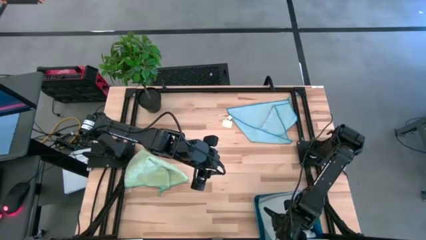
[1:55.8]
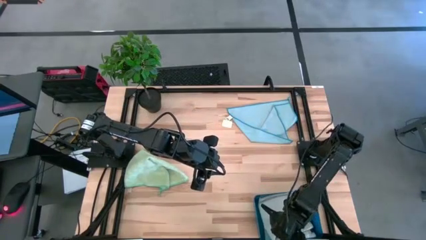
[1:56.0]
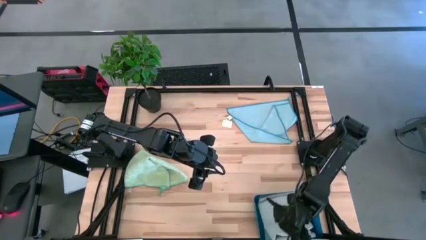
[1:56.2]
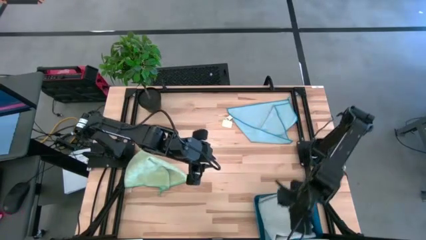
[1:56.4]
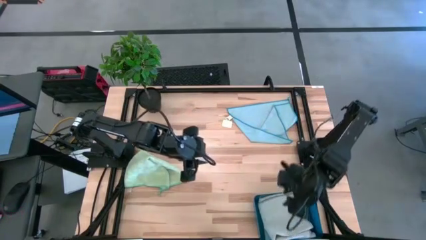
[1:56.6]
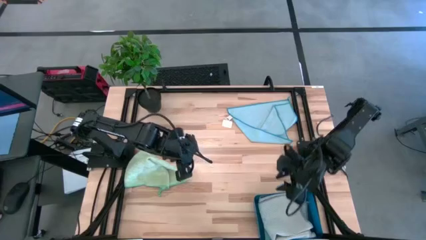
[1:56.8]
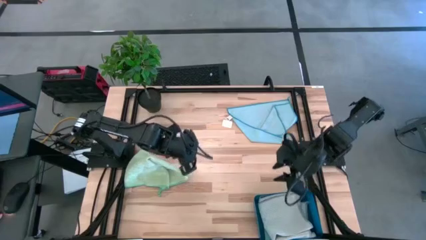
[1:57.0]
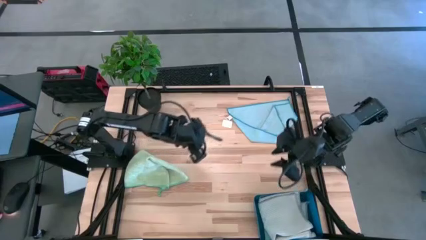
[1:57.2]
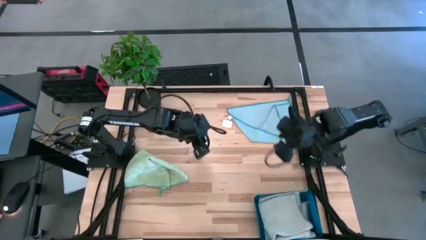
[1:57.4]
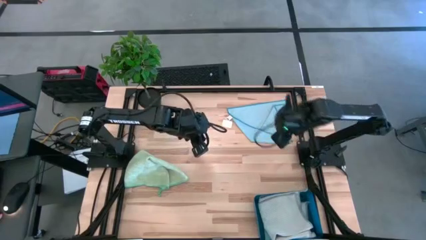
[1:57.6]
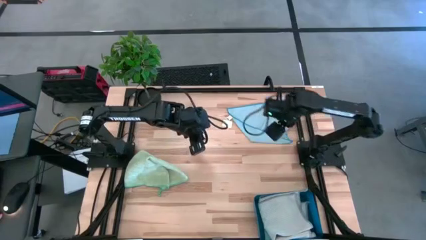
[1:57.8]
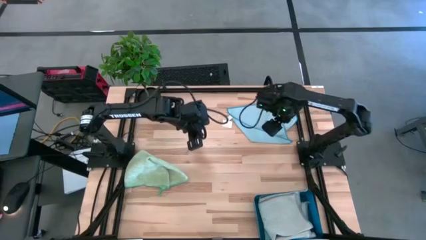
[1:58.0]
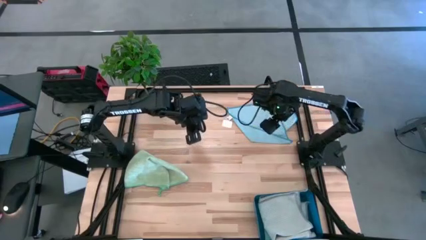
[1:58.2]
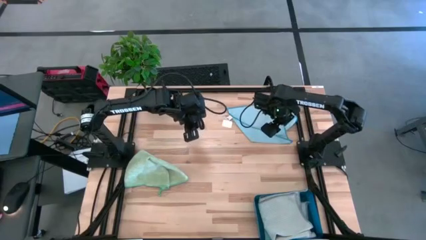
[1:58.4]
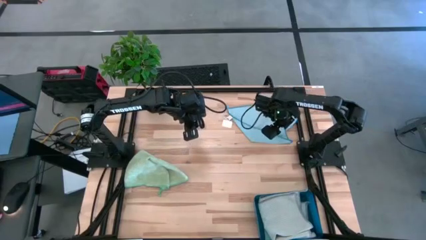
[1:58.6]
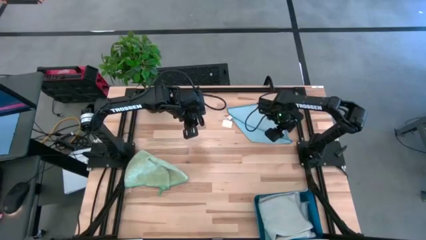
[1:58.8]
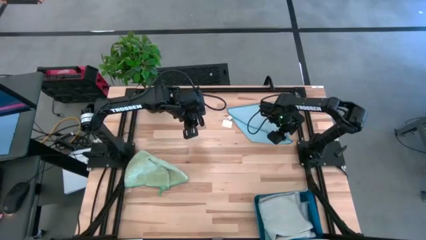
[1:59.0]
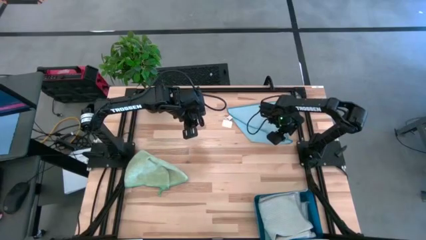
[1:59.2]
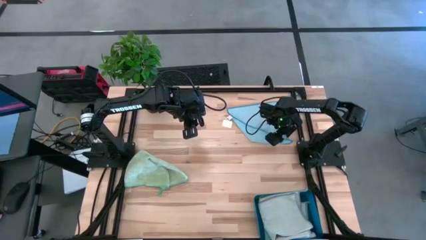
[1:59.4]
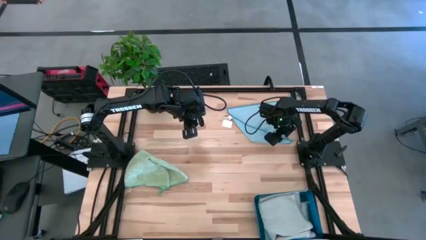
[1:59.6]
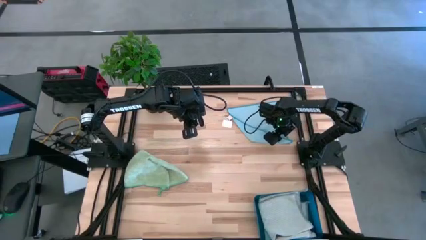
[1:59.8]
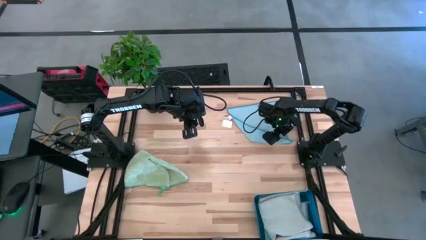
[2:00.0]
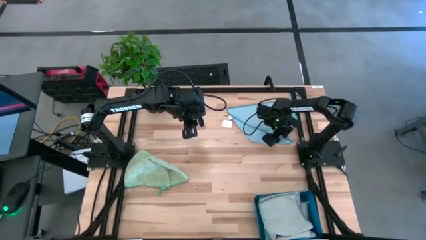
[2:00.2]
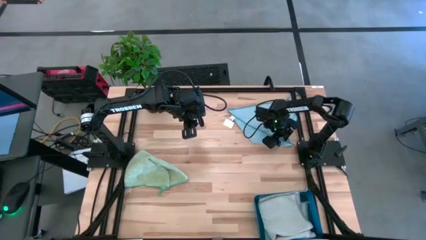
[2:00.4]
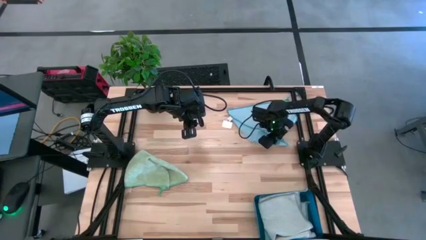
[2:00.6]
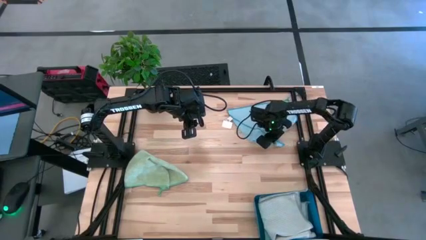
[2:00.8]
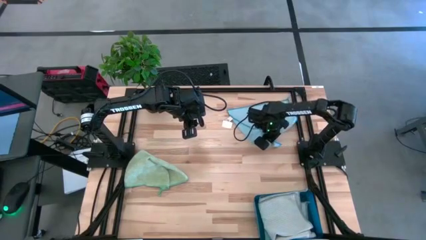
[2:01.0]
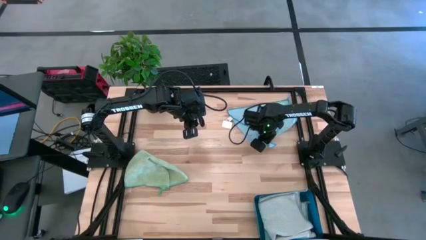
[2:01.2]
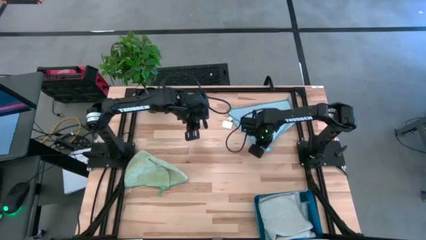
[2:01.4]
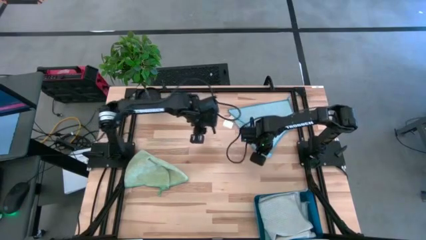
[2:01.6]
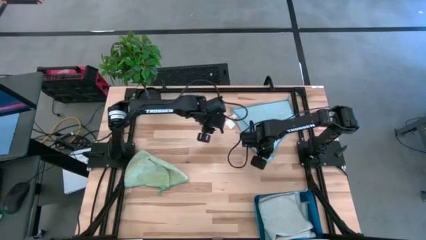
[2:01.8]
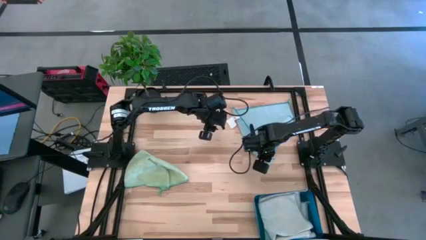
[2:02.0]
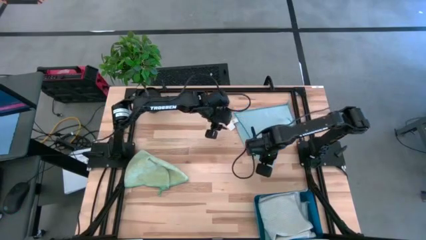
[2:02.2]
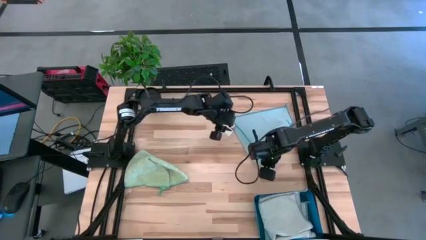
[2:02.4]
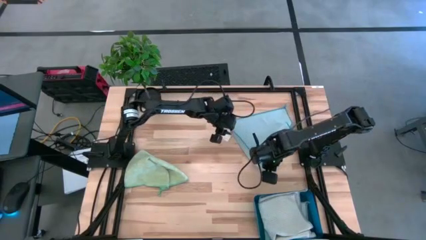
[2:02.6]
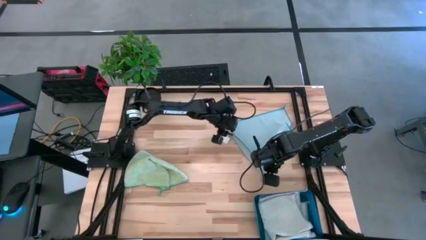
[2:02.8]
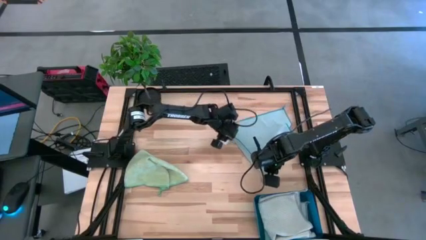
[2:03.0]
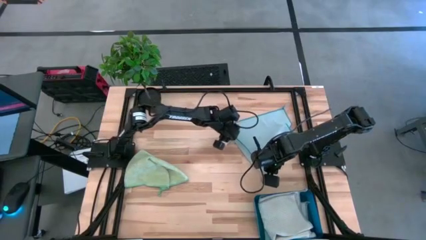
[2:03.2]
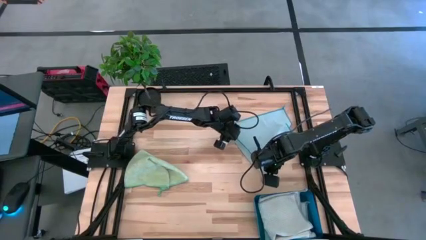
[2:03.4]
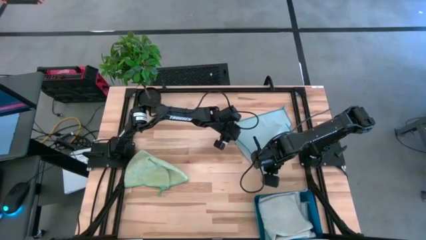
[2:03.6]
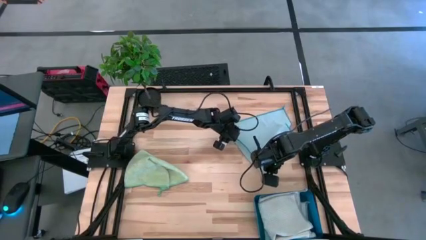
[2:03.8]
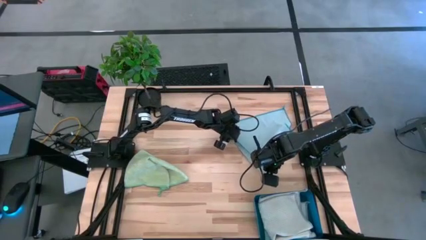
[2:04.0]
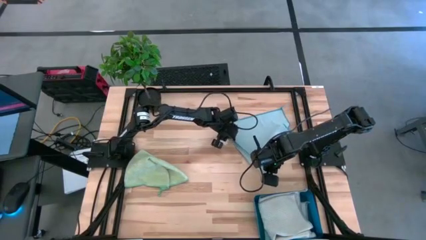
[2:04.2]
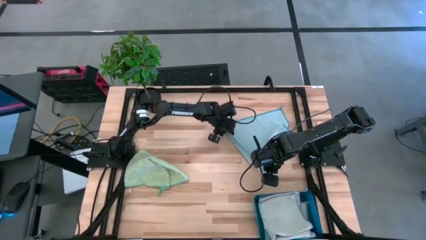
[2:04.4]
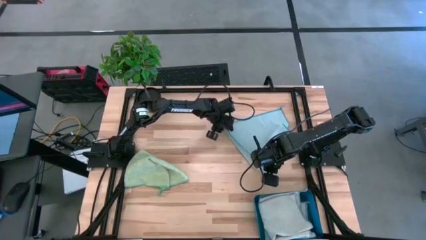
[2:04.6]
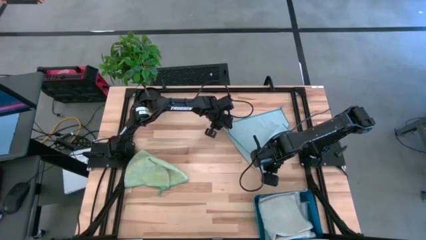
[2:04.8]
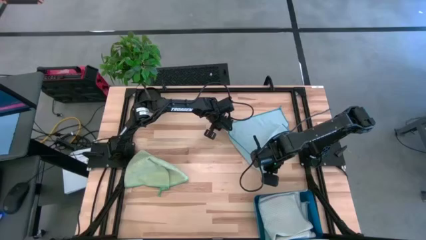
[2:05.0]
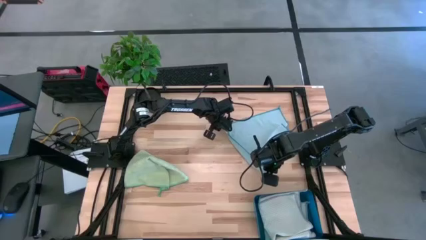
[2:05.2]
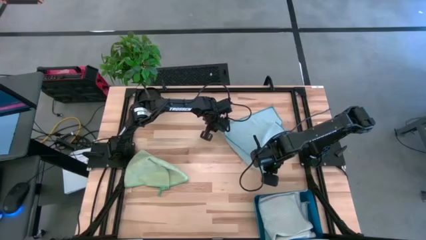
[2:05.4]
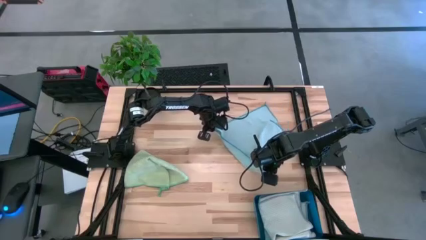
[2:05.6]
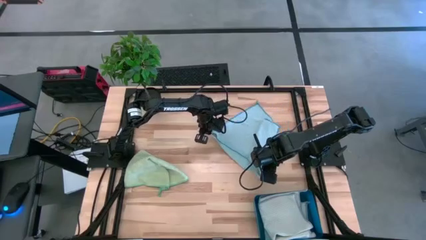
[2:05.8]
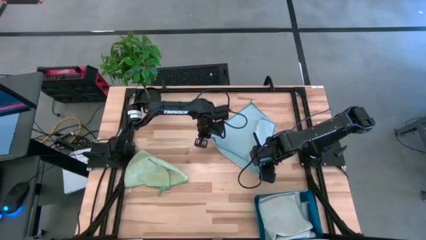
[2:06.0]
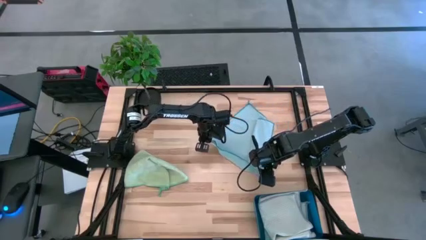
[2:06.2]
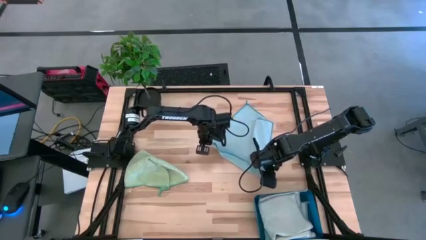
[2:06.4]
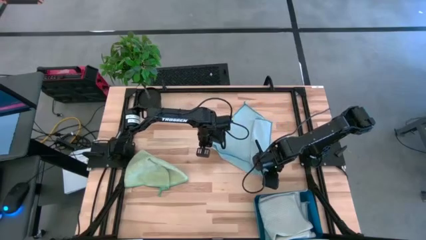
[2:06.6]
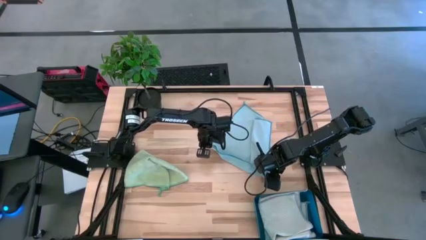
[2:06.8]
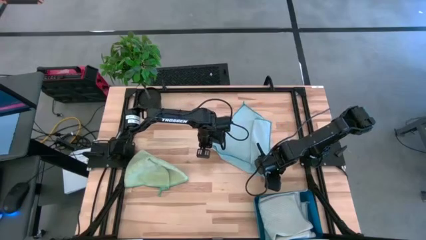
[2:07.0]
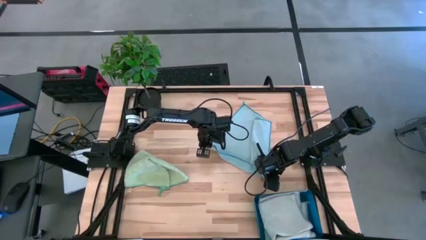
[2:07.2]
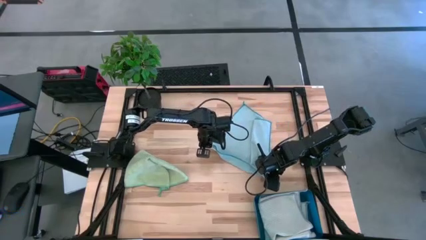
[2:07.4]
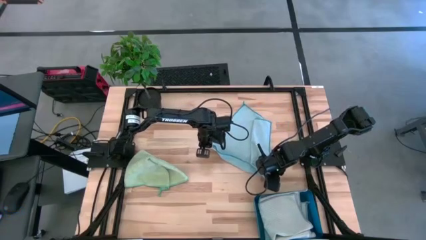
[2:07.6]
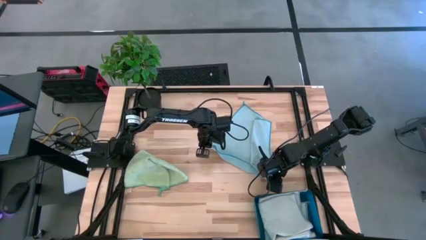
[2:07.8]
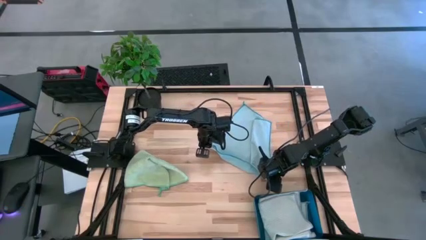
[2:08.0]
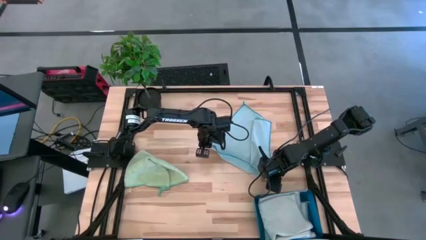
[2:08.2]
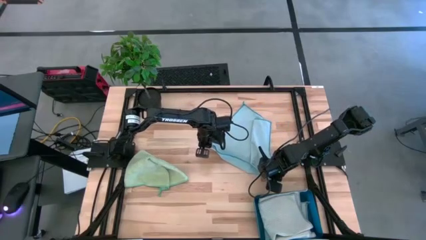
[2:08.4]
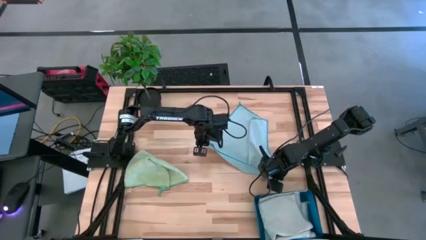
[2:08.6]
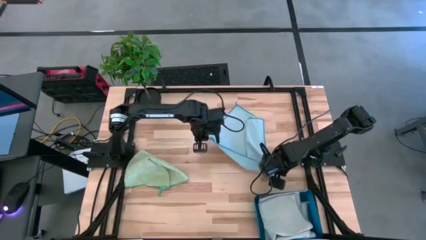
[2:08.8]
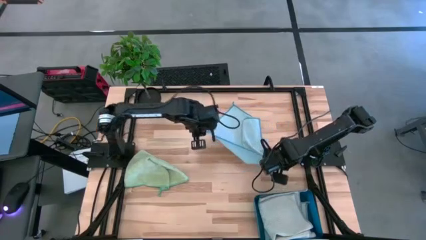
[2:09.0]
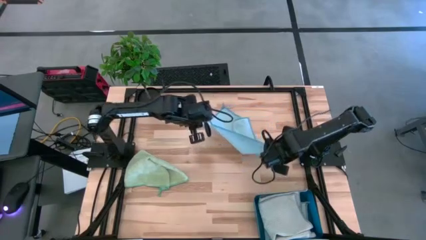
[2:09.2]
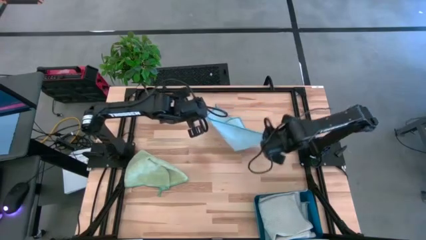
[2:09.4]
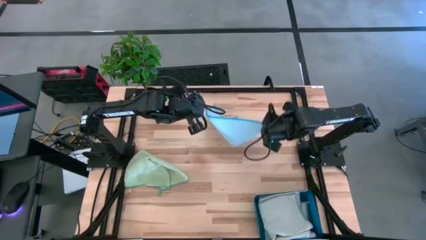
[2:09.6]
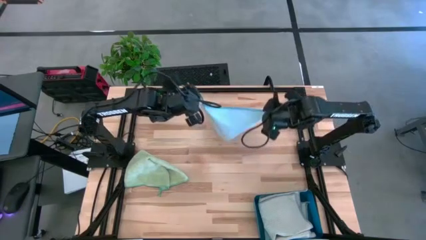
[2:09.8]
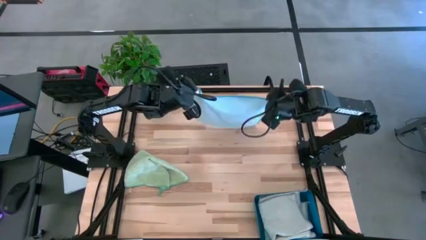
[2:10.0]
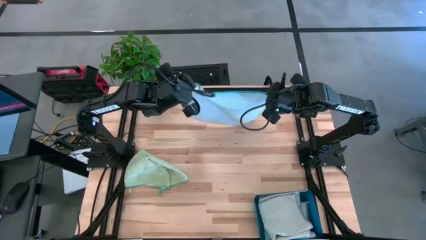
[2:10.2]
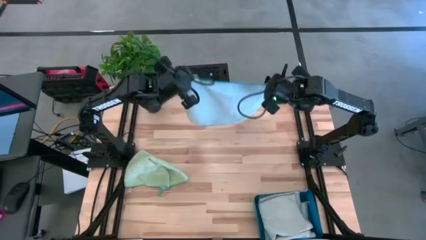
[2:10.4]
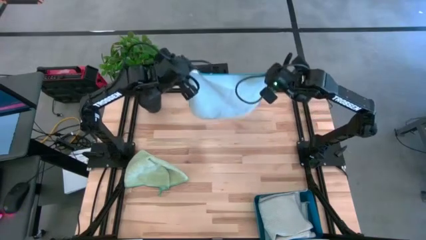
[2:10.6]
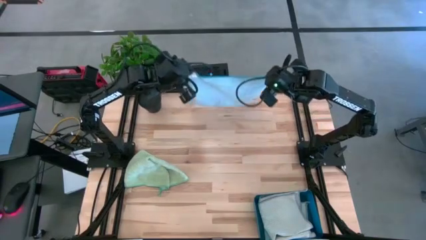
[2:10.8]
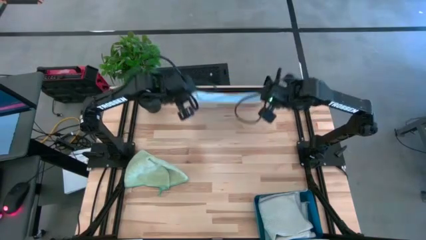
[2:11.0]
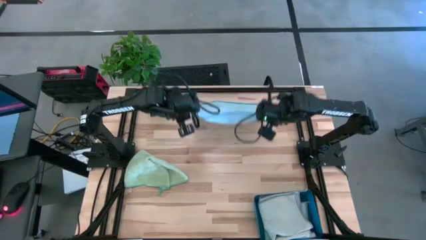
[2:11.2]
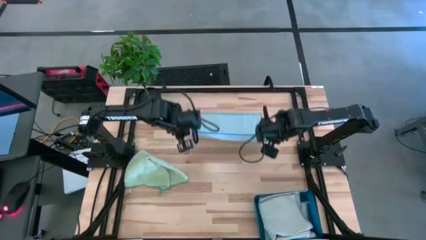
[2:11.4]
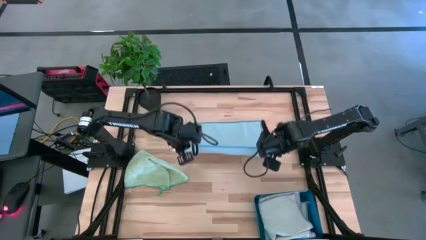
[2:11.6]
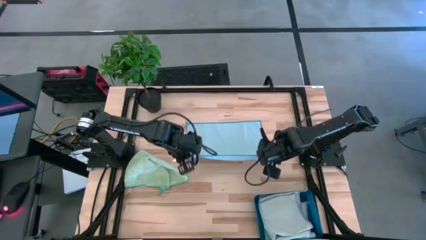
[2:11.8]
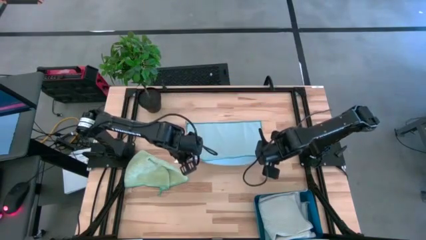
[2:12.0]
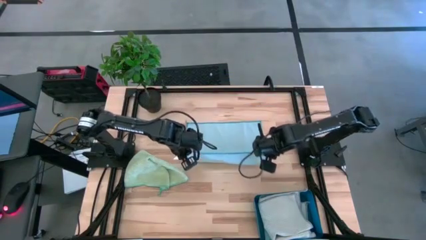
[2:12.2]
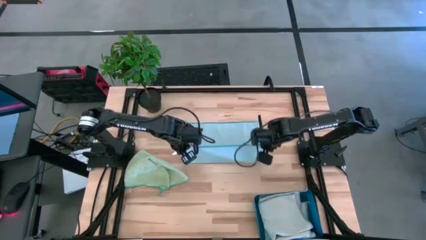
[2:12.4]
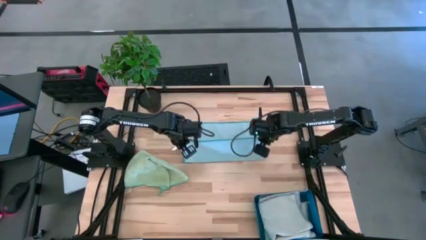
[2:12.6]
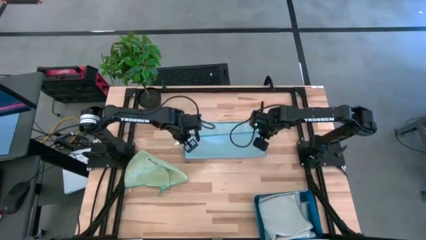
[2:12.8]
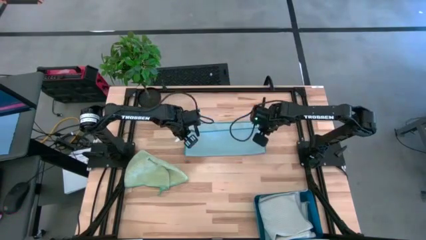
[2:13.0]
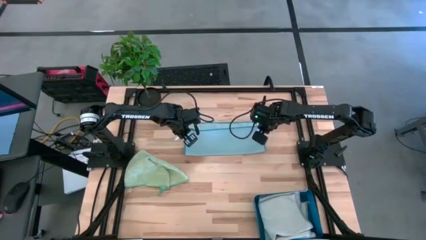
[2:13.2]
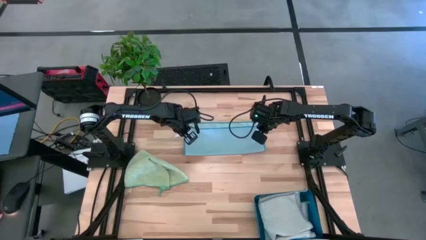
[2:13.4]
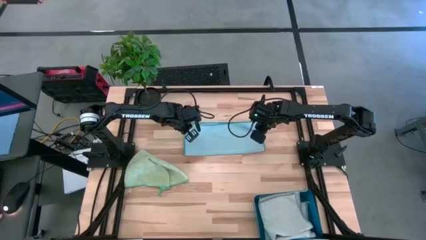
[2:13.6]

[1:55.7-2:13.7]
Task: Fold microfiber towels
Fold the blue microfiber cloth
